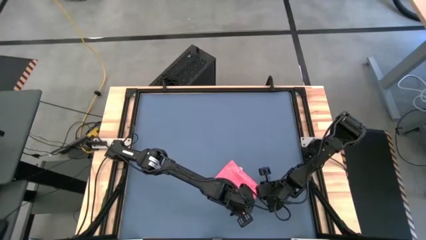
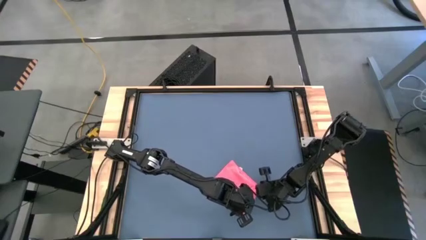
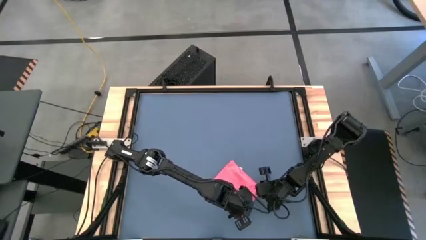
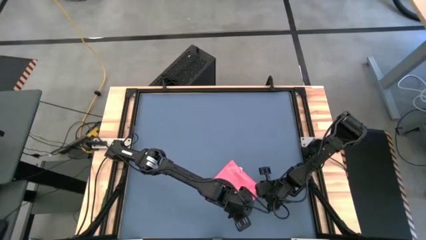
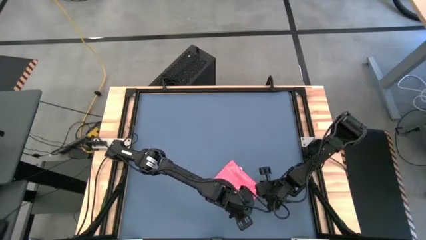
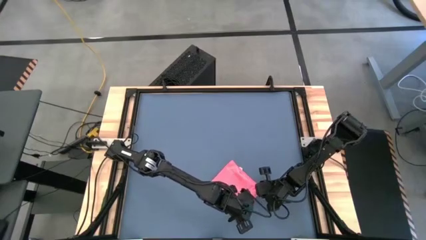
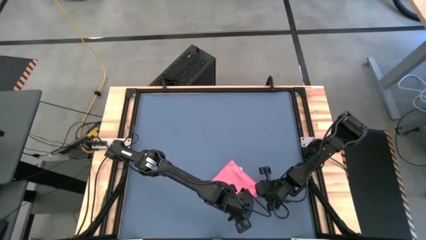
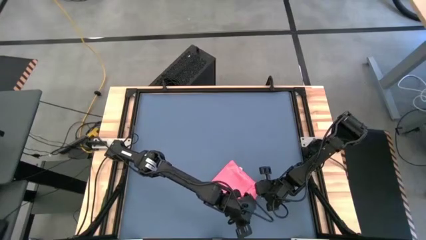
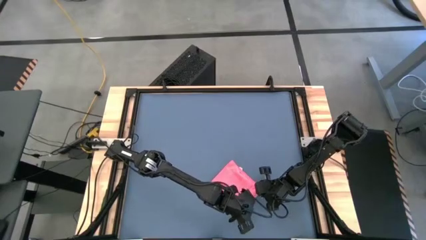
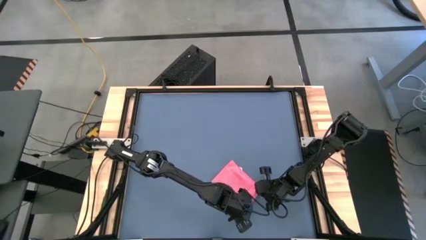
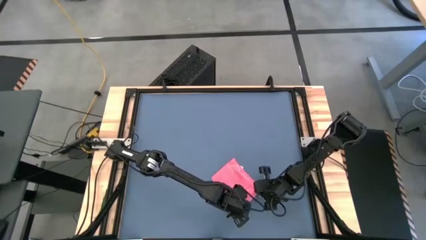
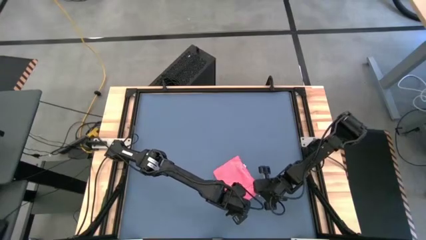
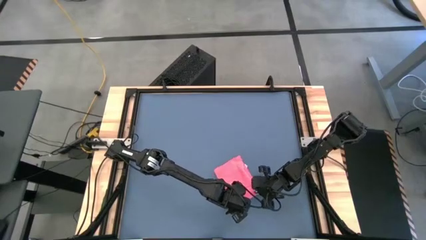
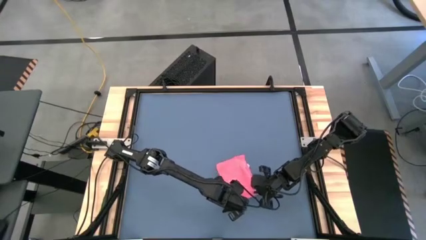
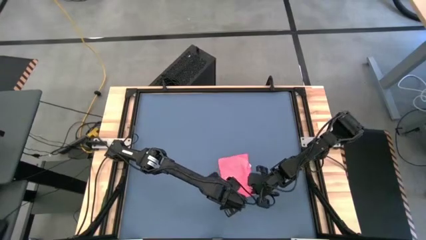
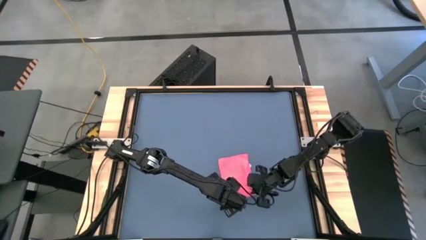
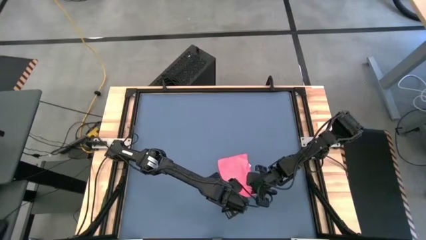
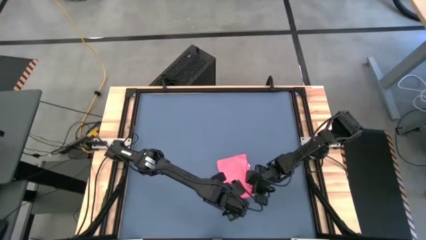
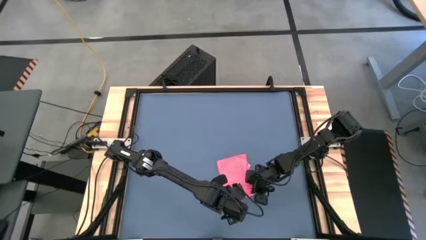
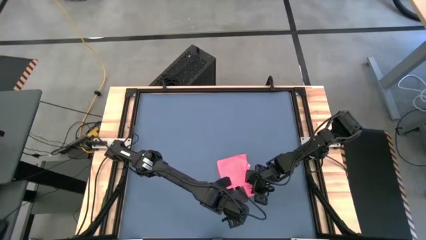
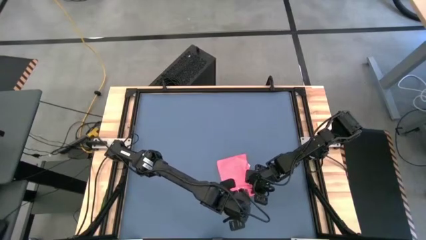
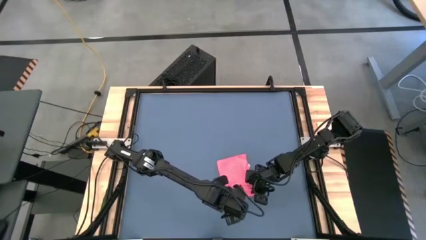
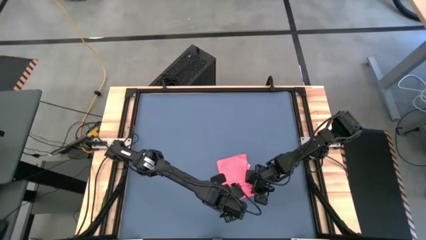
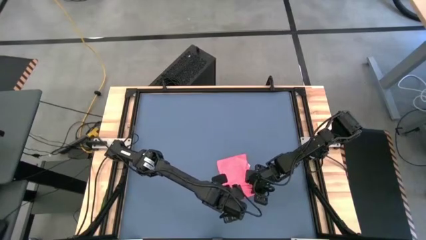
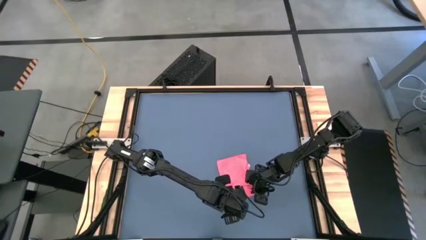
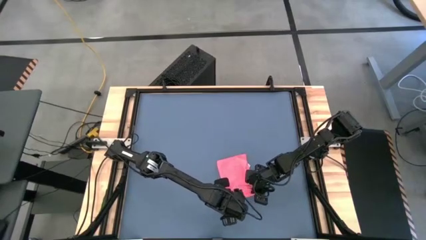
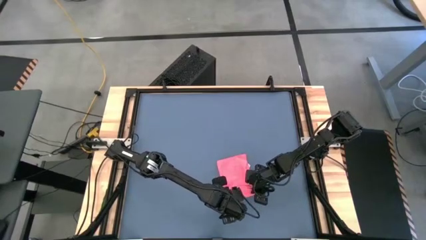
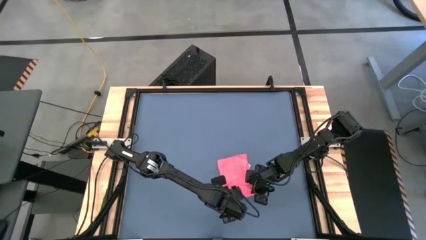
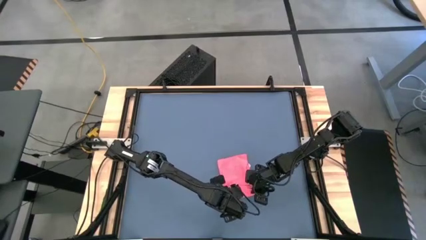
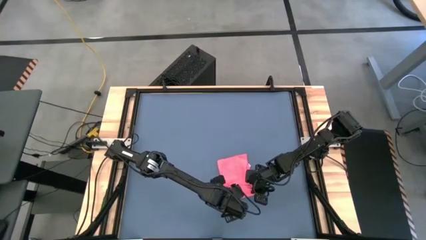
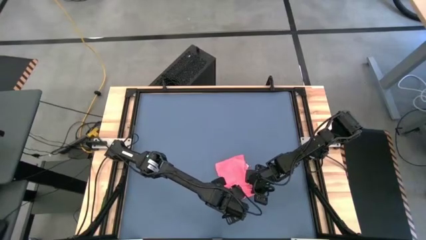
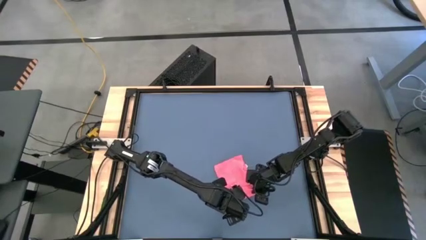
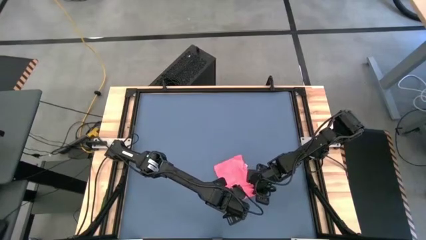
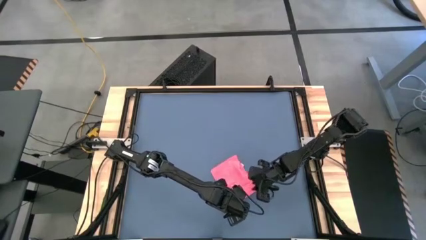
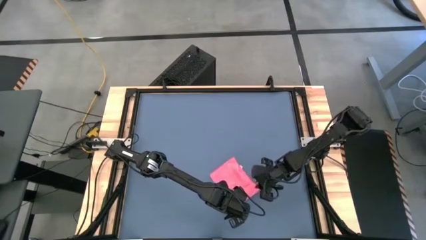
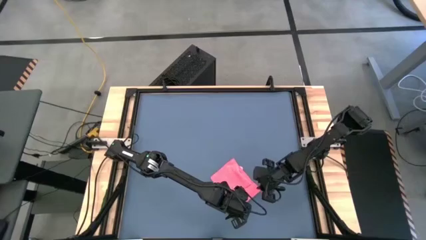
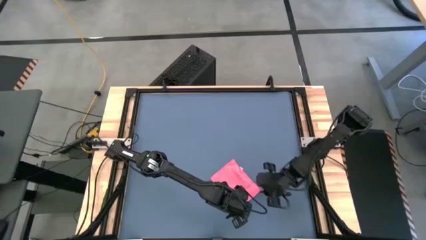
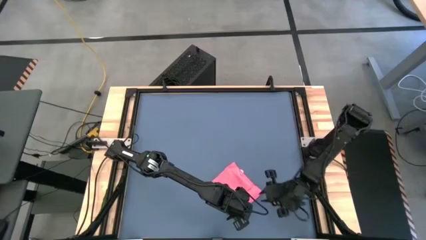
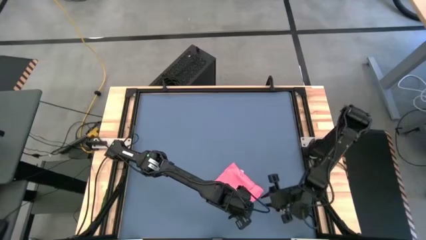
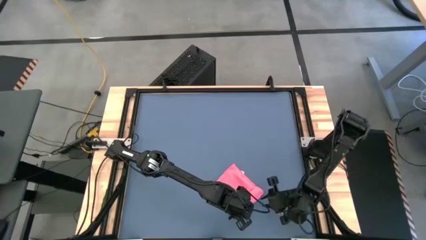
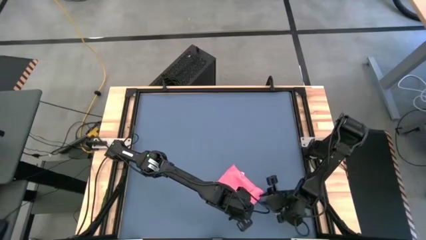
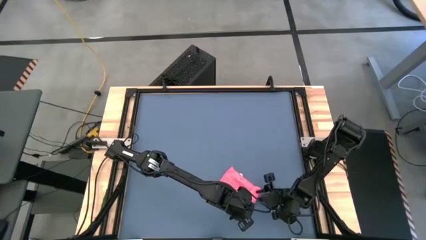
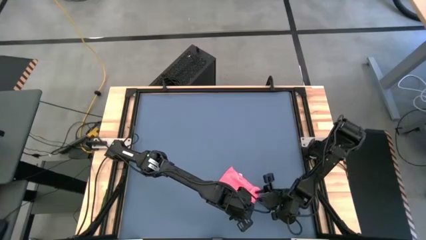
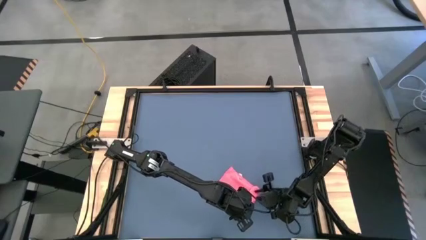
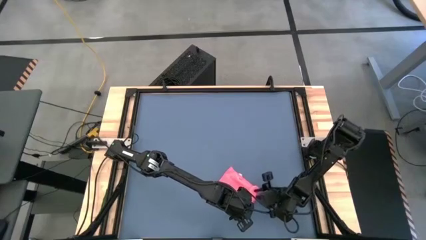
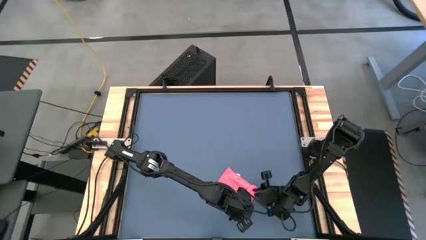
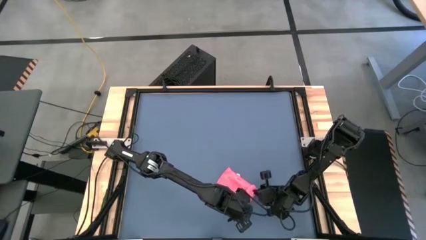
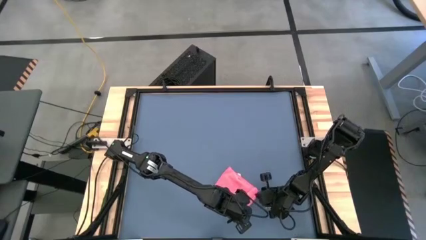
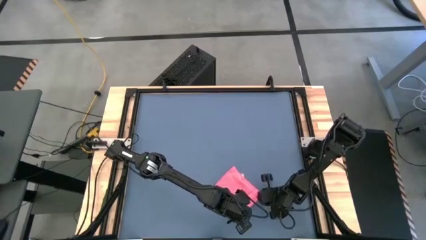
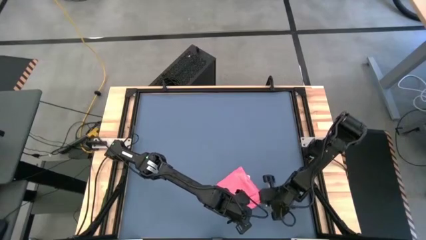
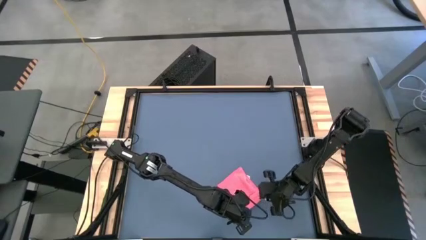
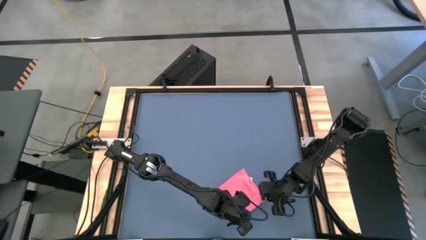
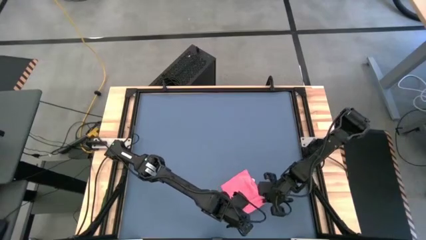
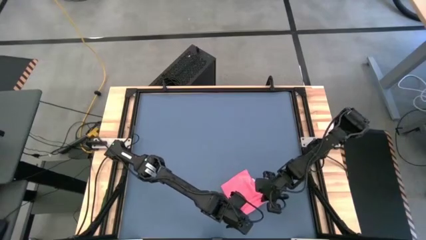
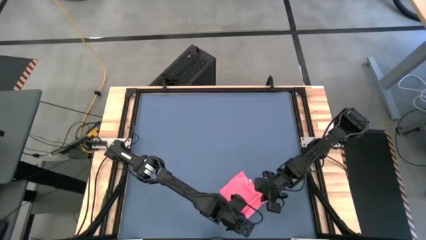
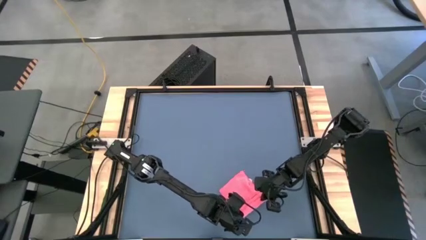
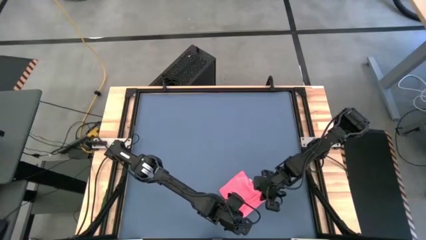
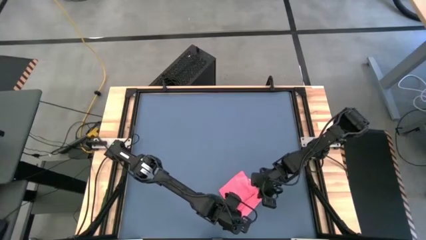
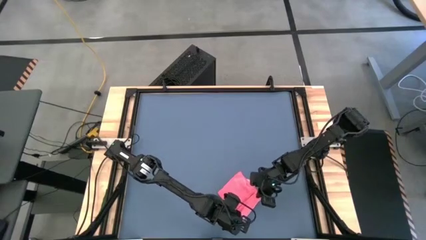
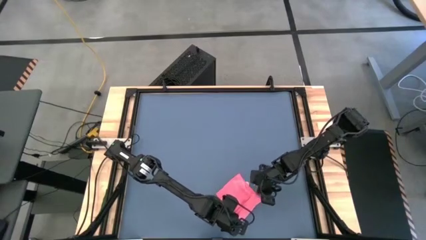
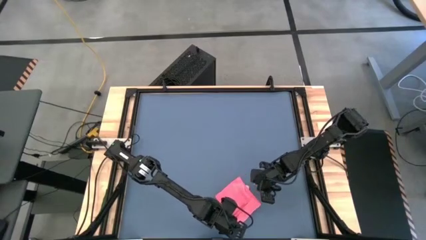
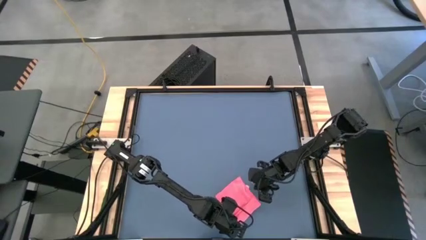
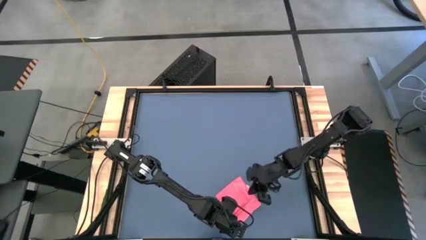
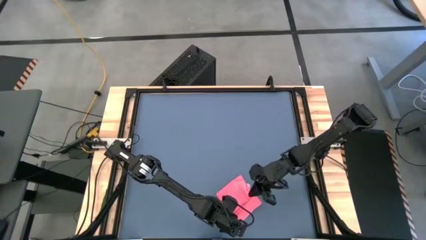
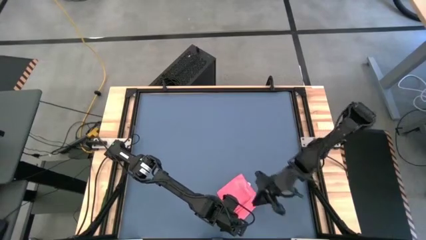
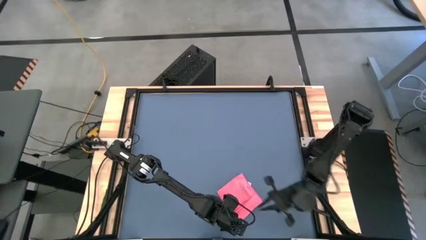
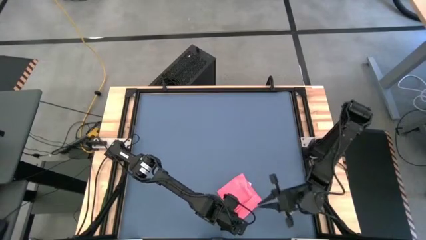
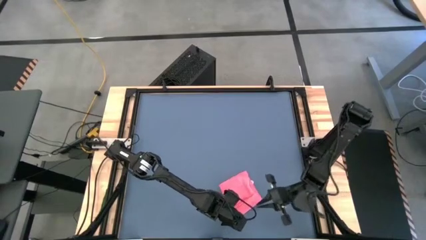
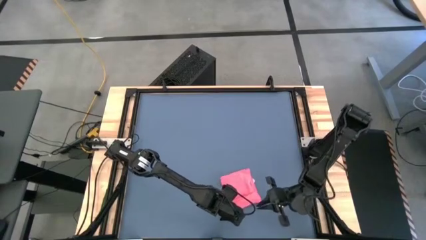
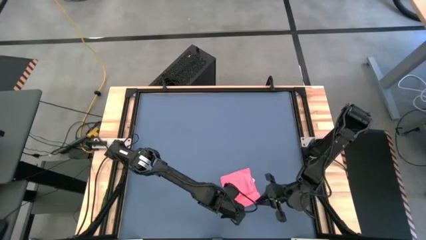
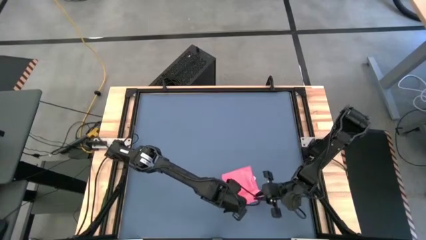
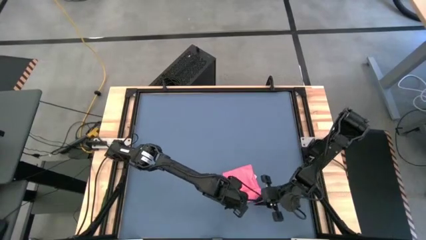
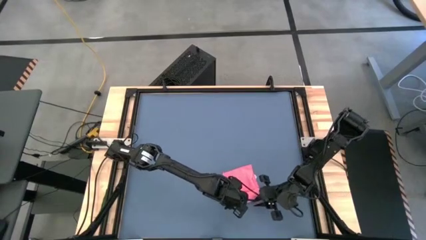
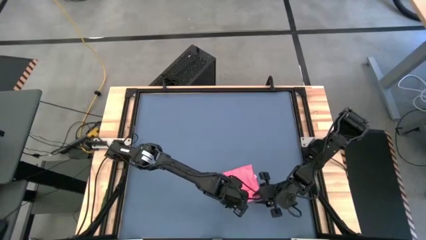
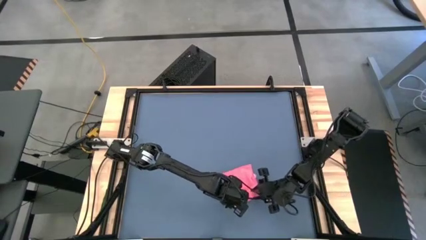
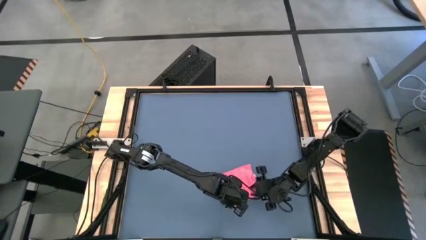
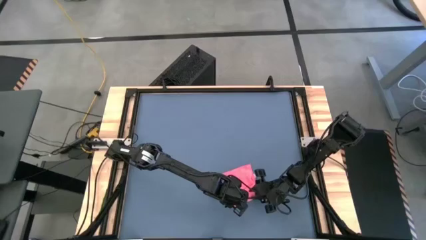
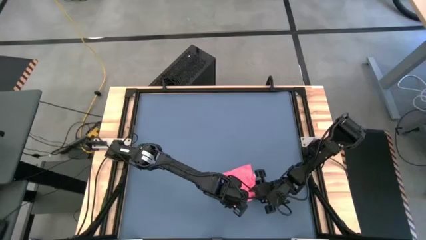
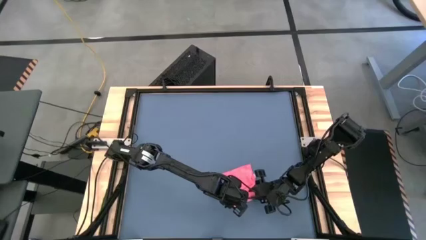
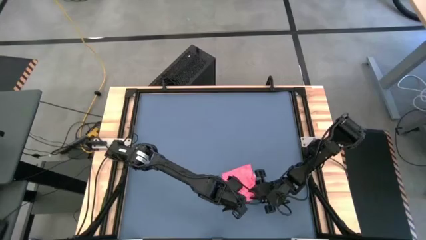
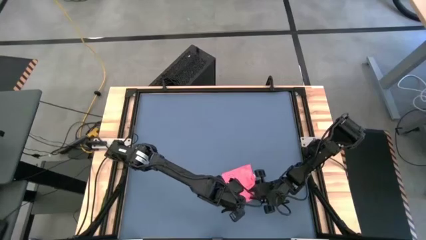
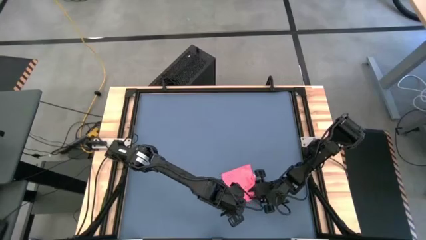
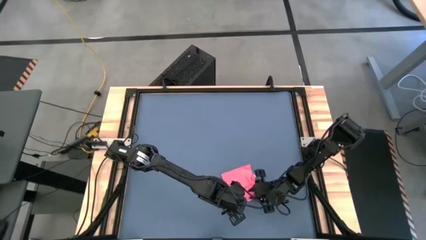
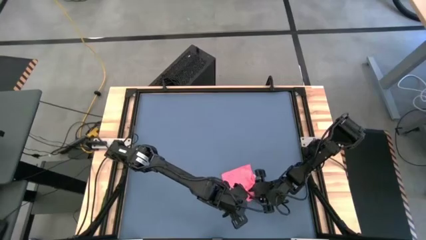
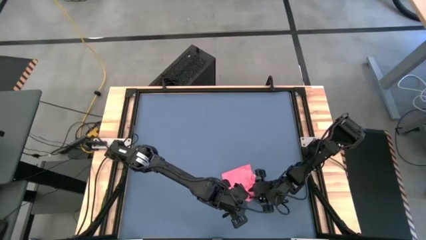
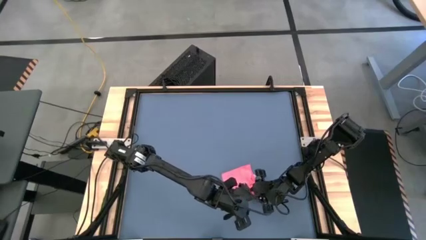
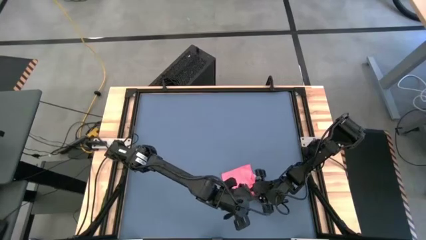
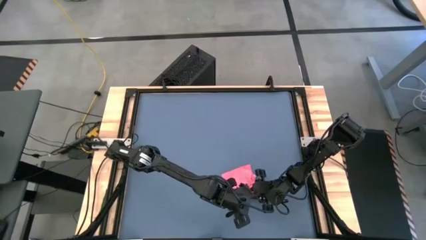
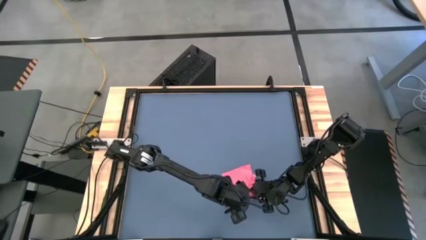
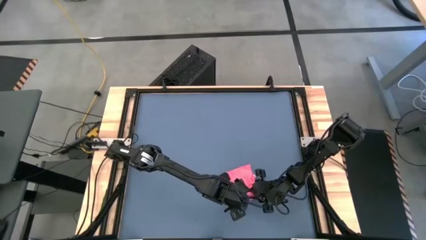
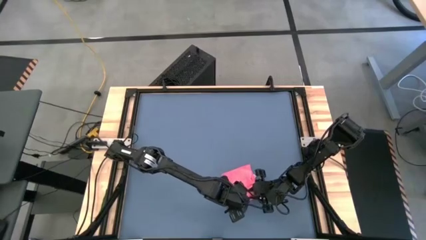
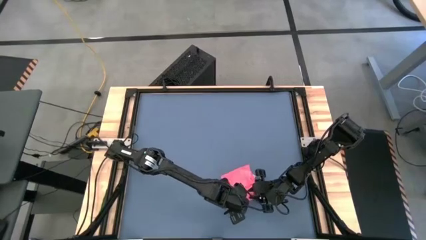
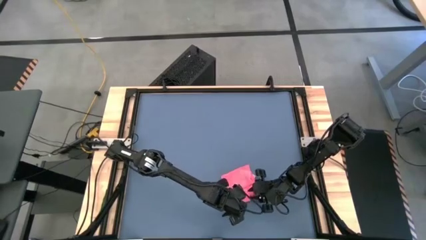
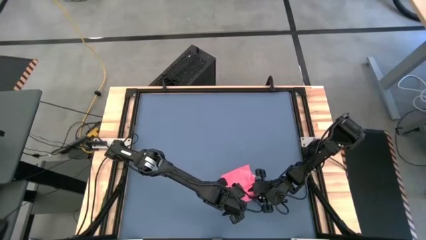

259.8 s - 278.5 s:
Task: Roll towel
Roll the pink towel
